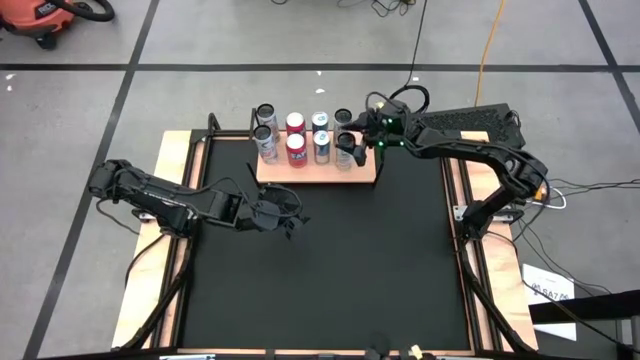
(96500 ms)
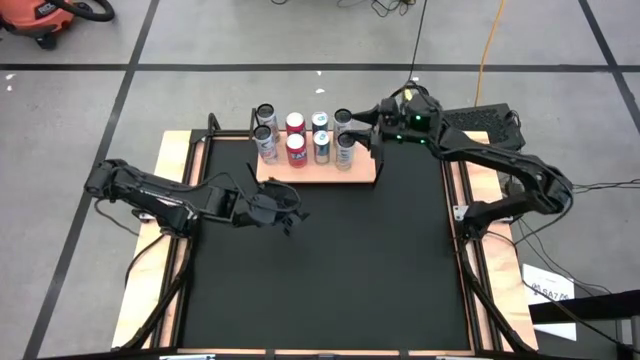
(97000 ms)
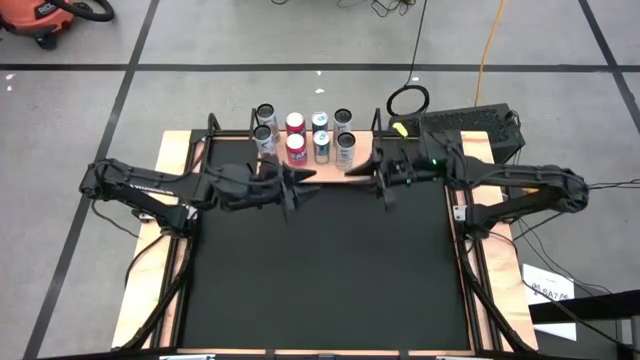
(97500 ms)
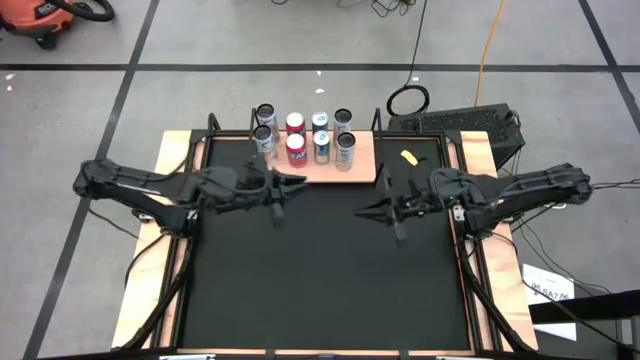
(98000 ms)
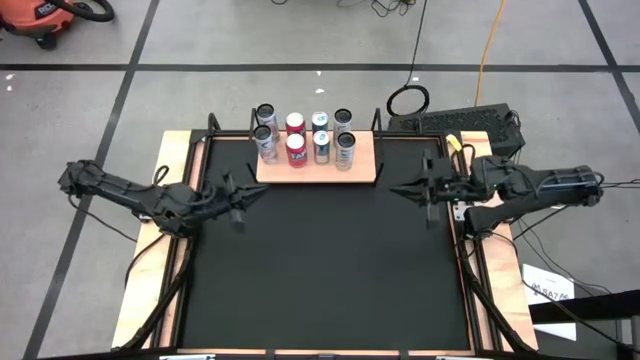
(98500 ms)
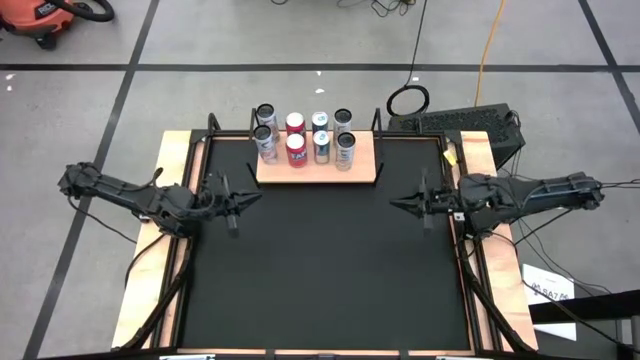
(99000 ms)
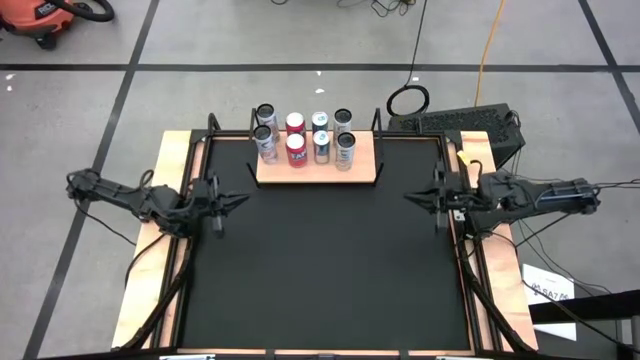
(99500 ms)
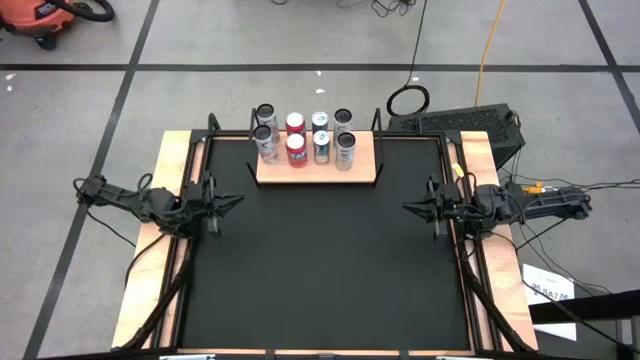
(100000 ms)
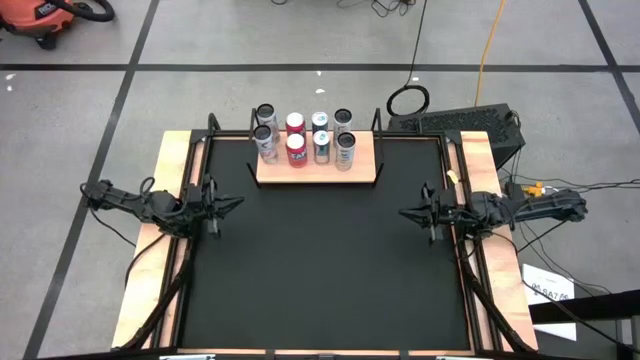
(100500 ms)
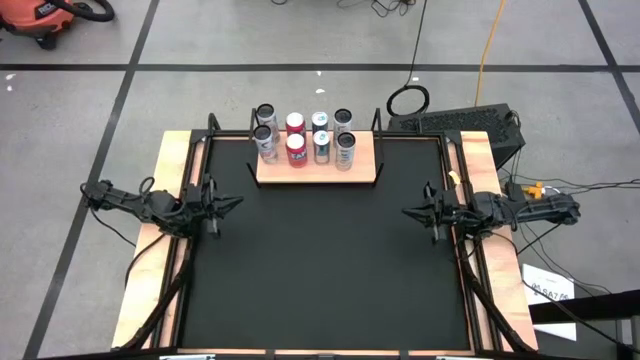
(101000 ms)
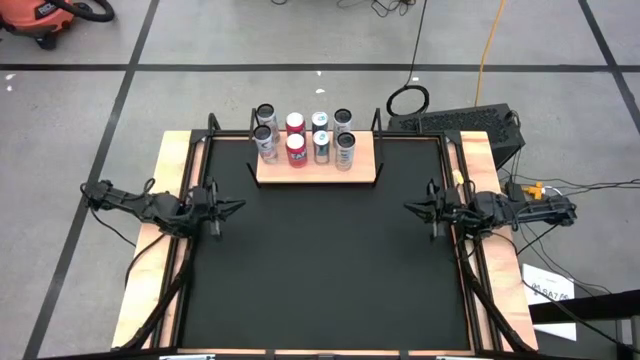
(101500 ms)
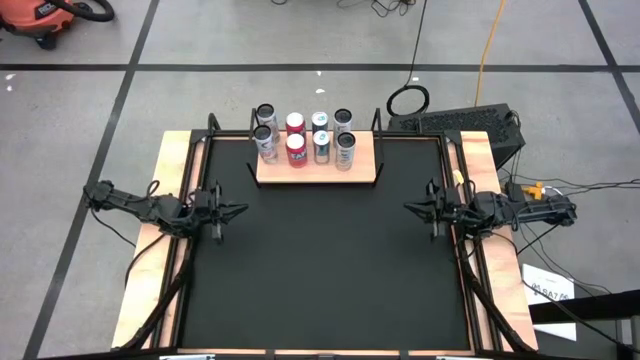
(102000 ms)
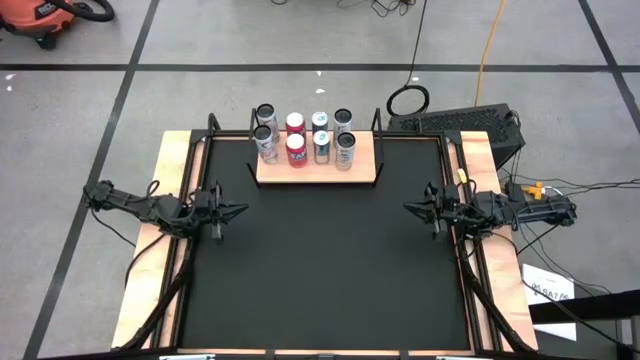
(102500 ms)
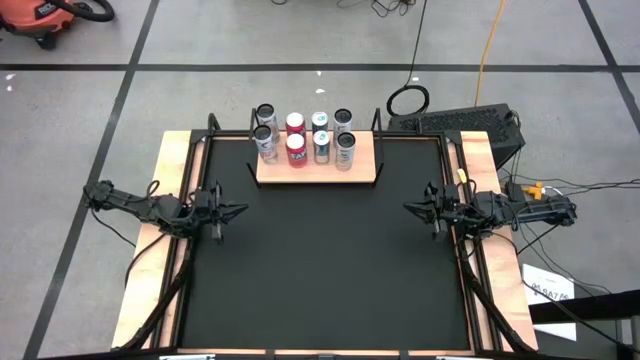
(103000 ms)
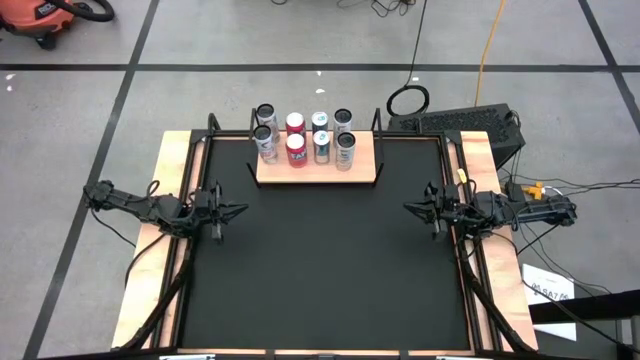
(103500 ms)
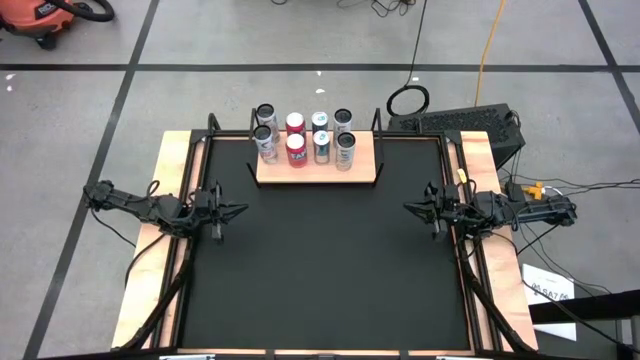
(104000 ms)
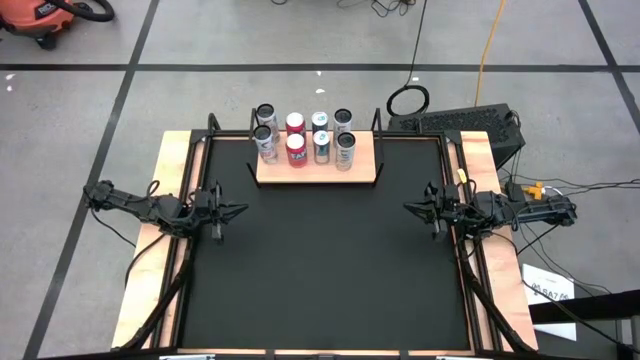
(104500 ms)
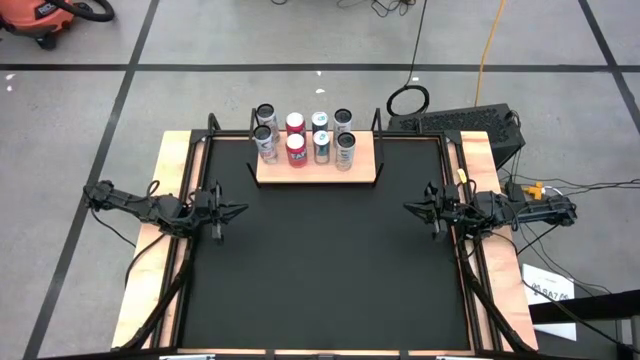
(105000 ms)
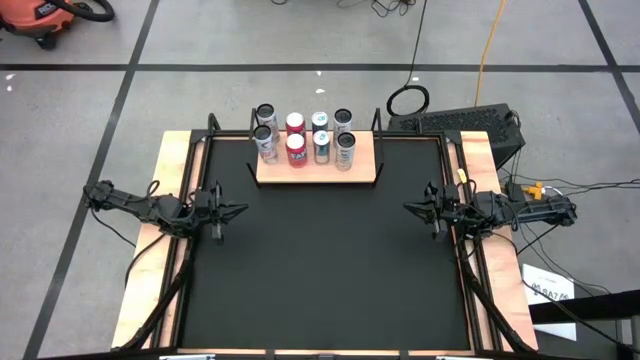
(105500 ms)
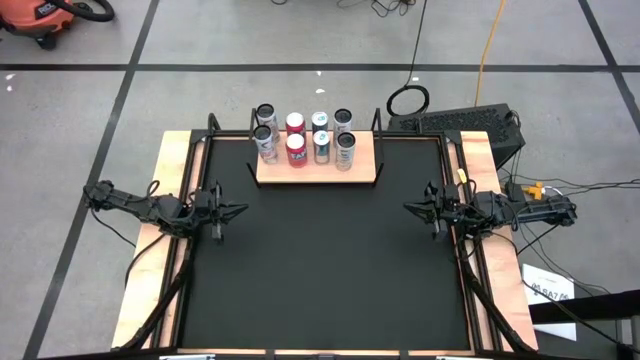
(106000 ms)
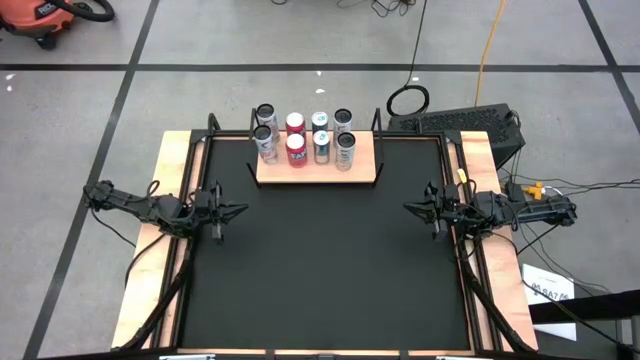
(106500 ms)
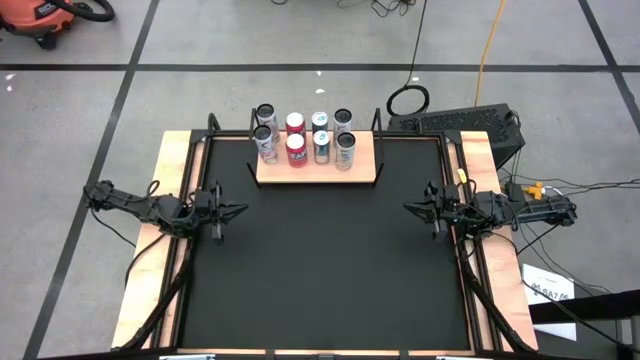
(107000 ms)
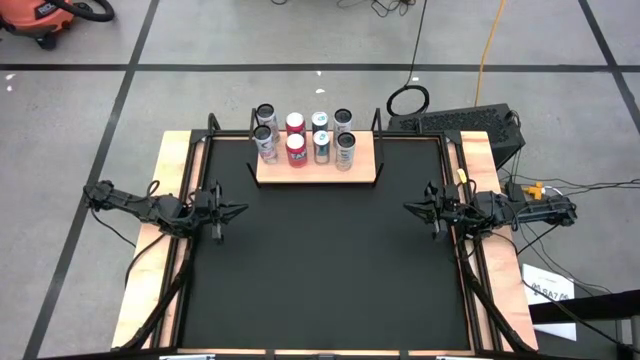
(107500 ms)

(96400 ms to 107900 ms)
Task: Place canned beverage on shelf
Return to Home Position

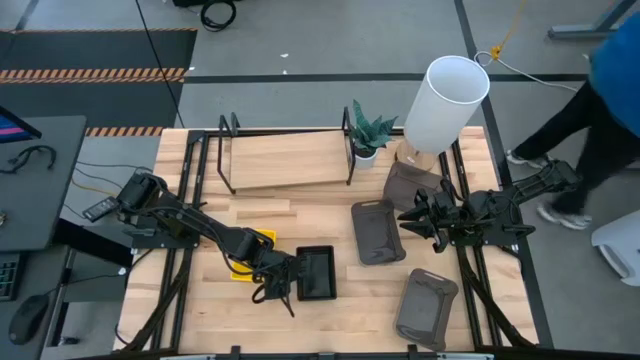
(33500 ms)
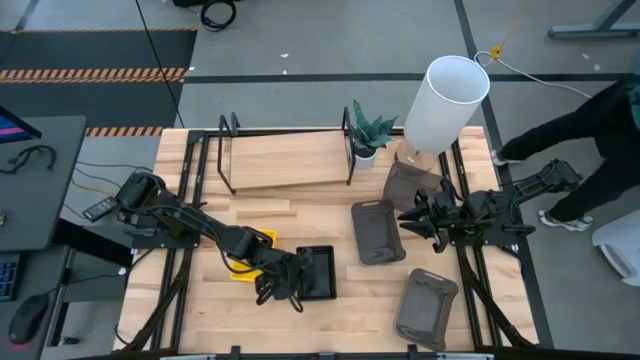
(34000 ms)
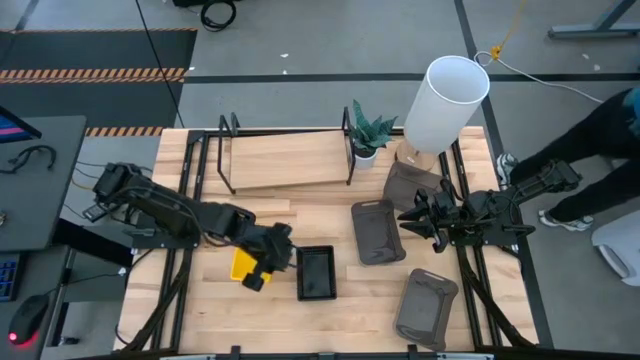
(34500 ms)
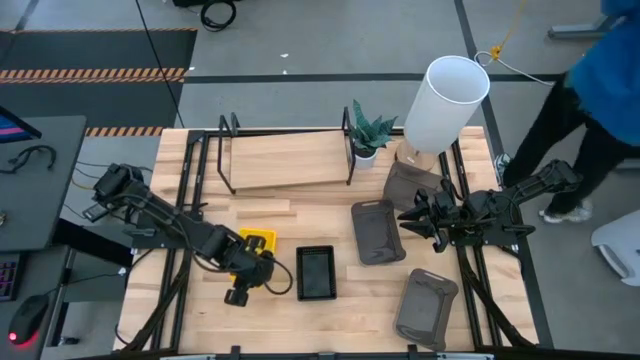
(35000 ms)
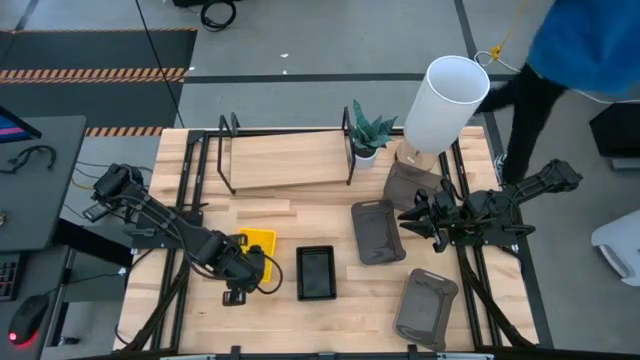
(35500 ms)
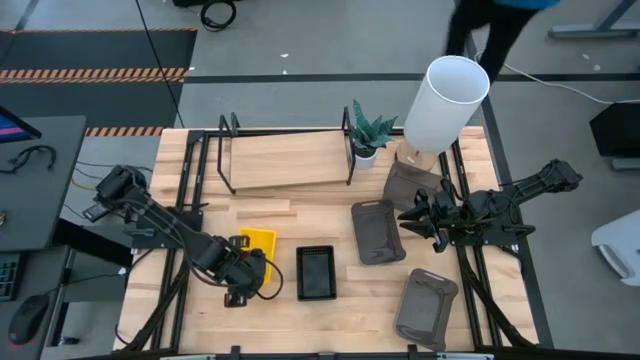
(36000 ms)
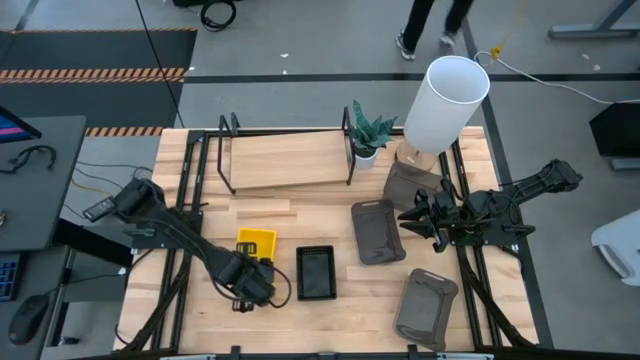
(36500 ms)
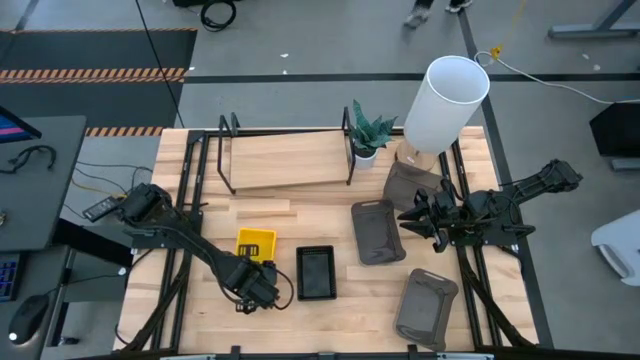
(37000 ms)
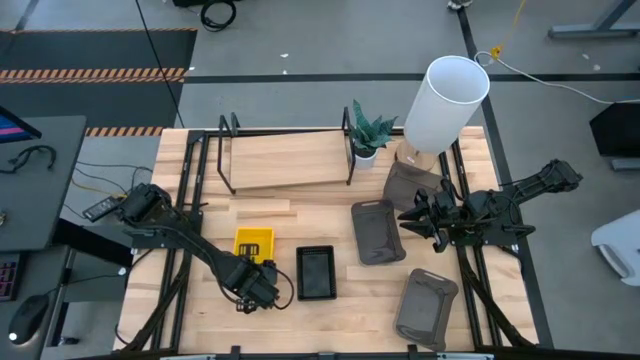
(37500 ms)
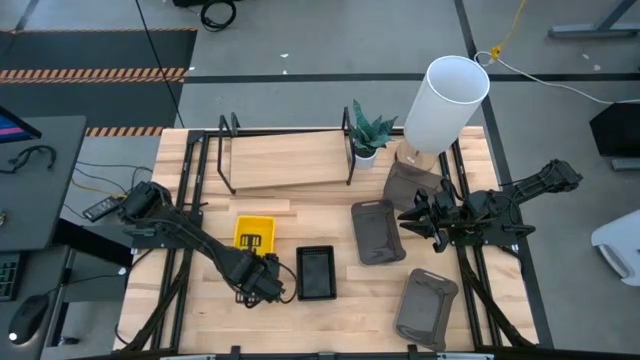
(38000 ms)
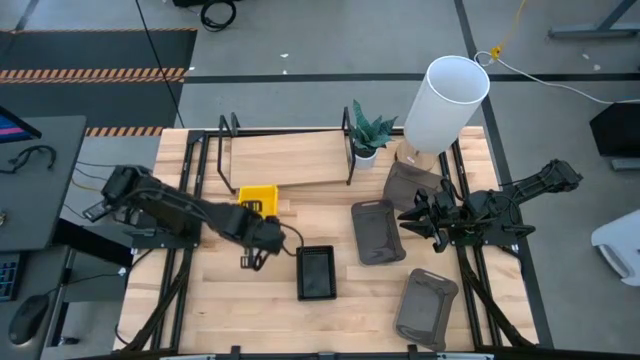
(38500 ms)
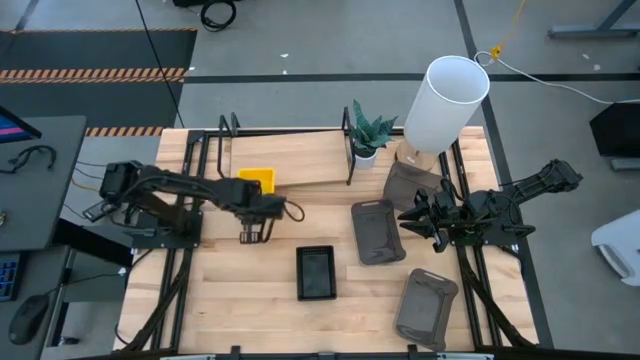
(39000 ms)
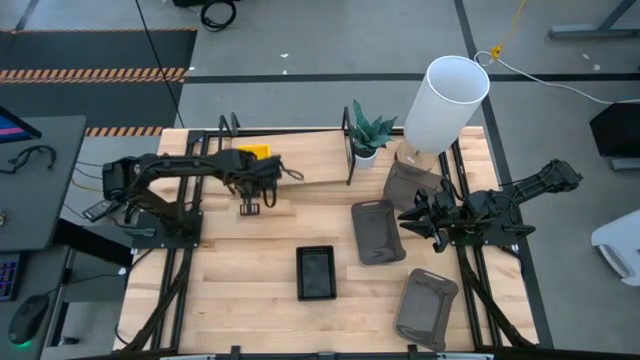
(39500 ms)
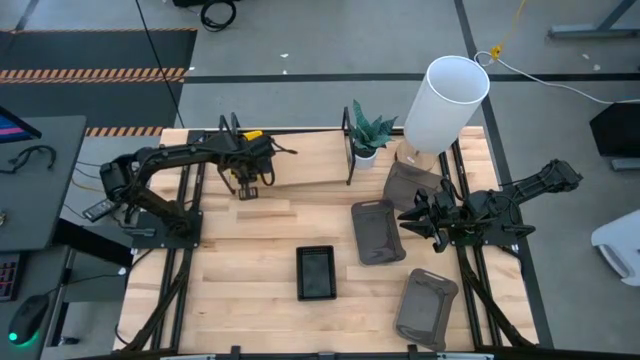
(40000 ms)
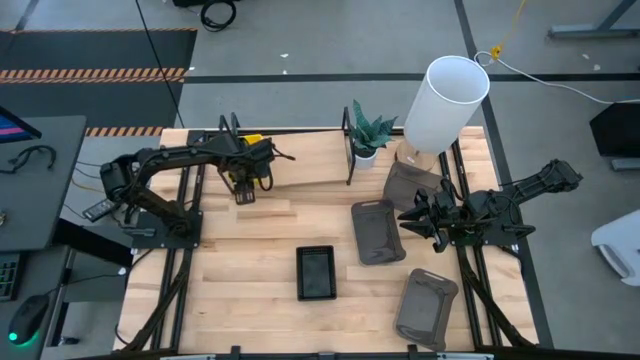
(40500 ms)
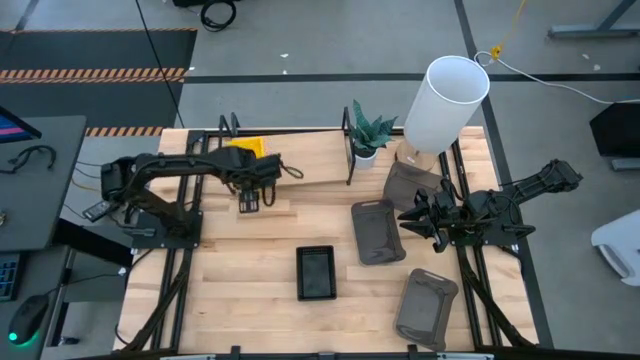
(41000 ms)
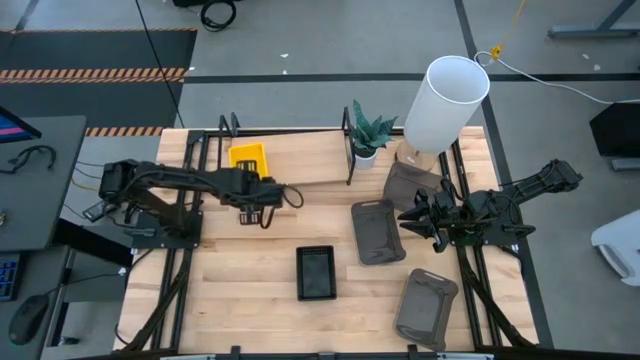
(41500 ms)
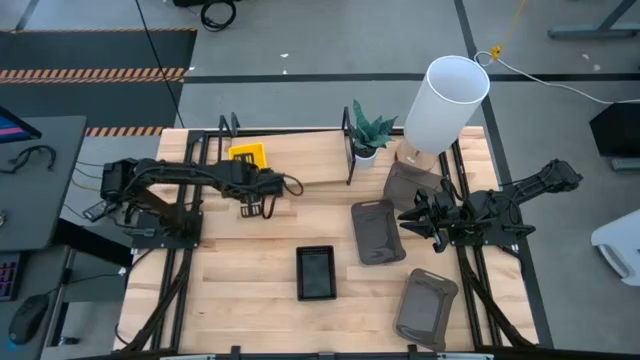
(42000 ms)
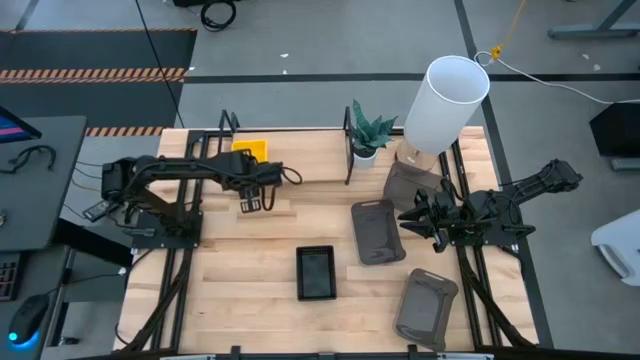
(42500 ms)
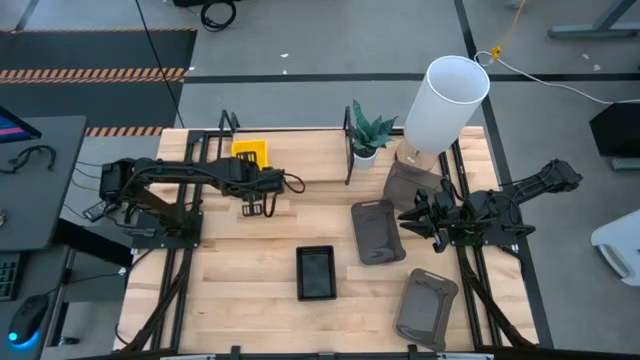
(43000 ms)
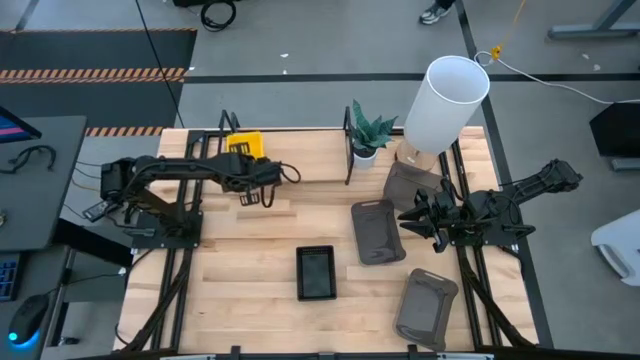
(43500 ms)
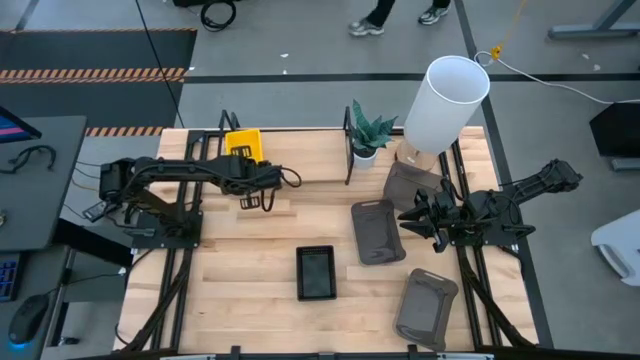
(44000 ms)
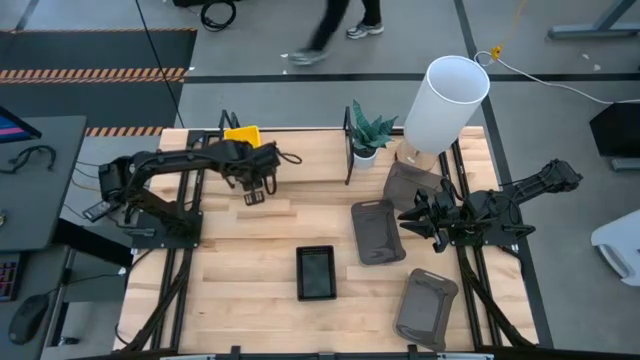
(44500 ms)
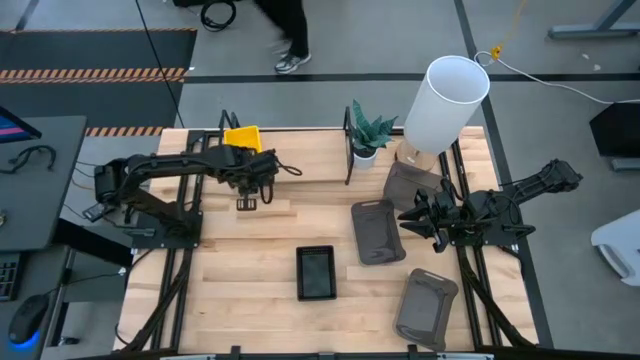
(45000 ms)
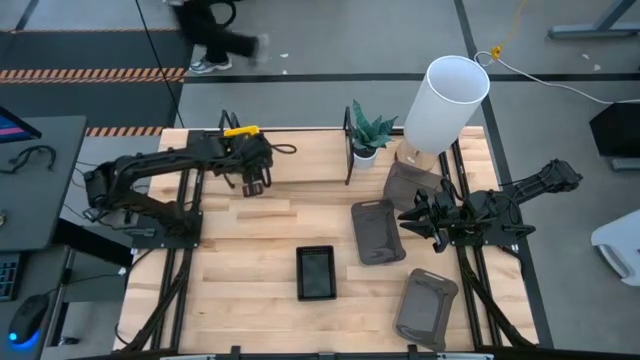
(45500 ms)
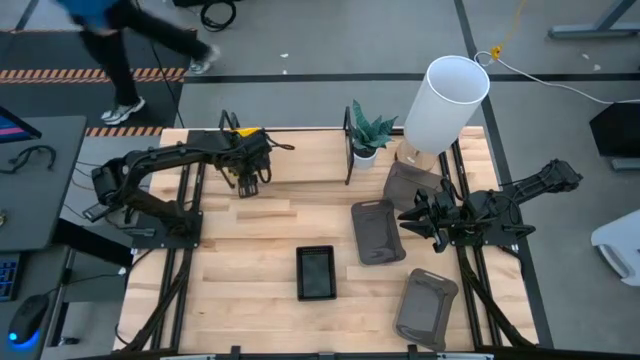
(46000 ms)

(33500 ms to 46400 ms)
Task: Stack baskets on shelf by color
Put the yellow bins on the shelf
